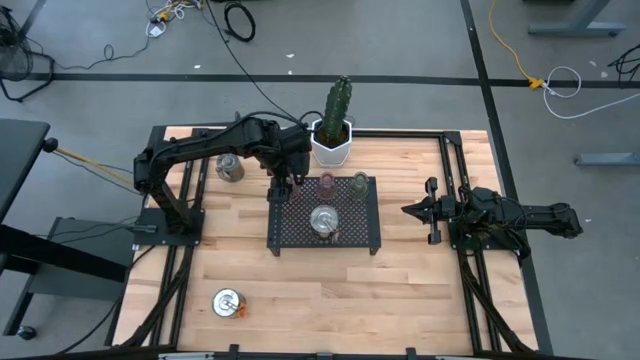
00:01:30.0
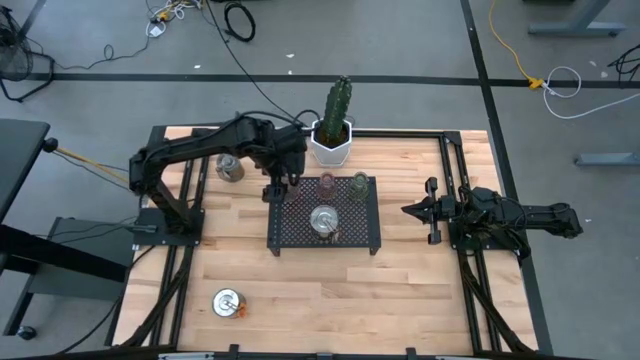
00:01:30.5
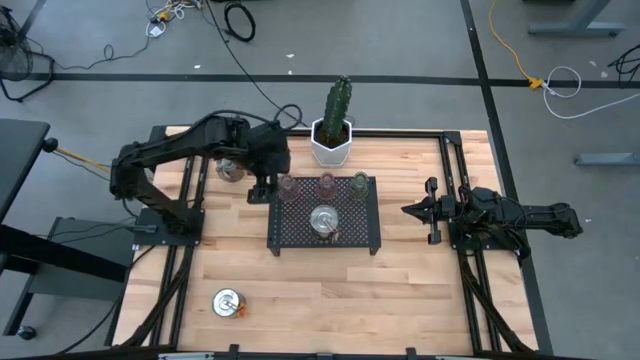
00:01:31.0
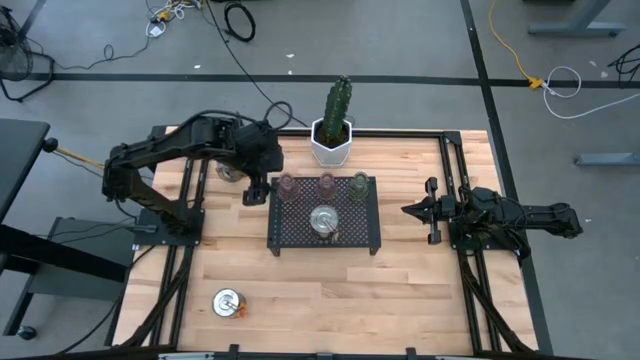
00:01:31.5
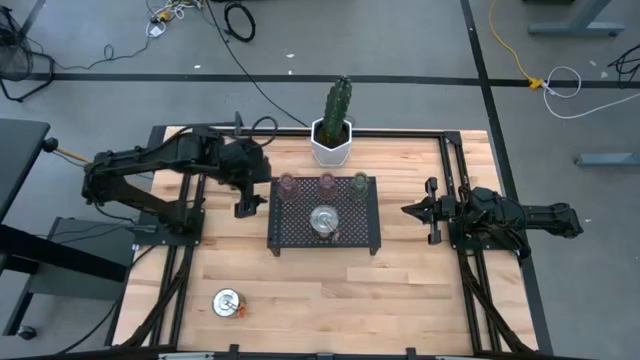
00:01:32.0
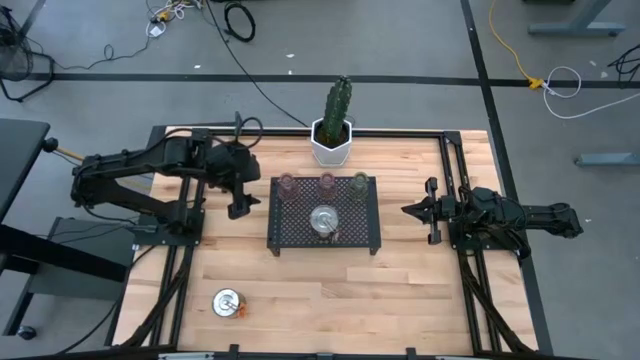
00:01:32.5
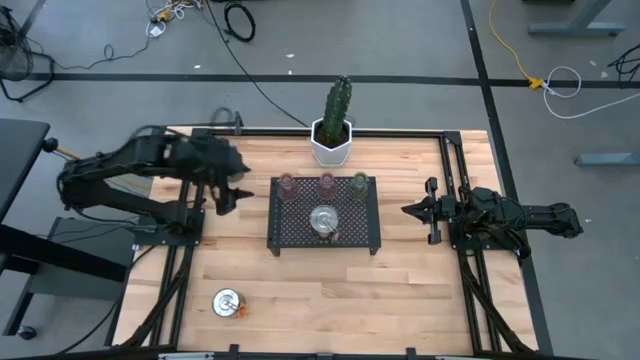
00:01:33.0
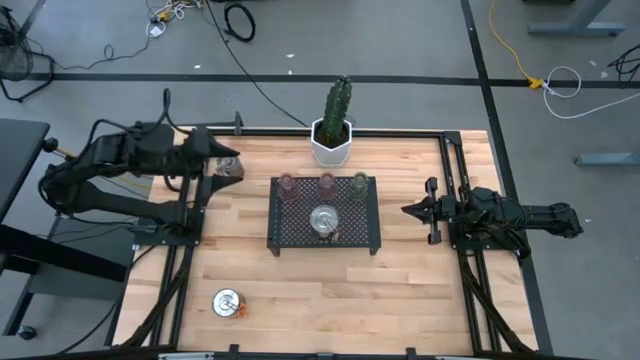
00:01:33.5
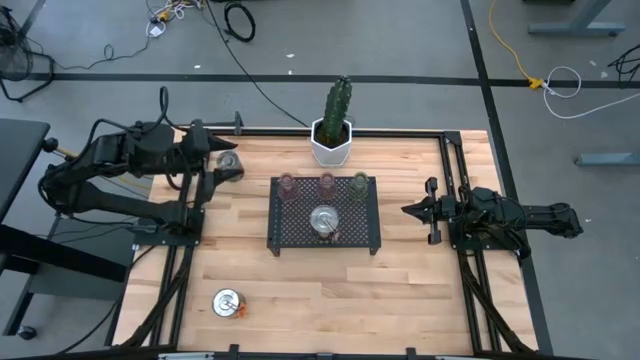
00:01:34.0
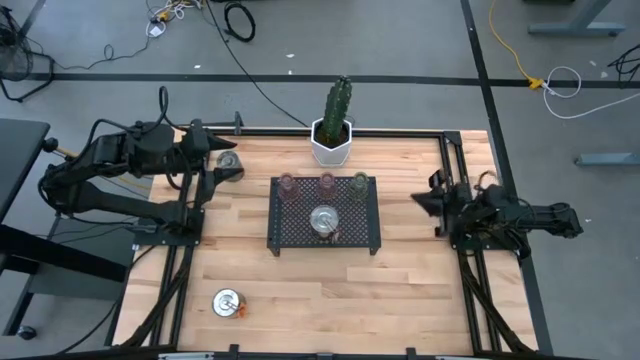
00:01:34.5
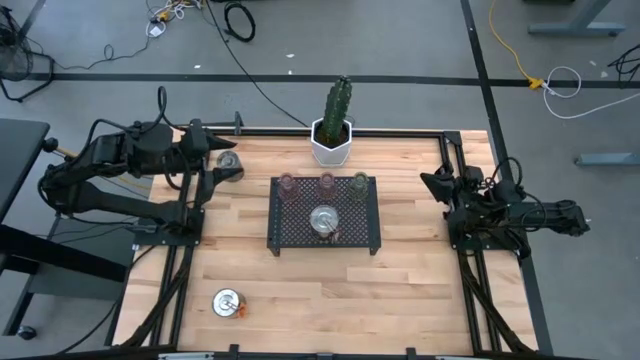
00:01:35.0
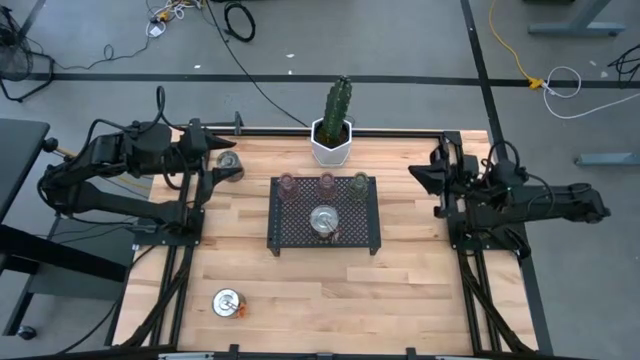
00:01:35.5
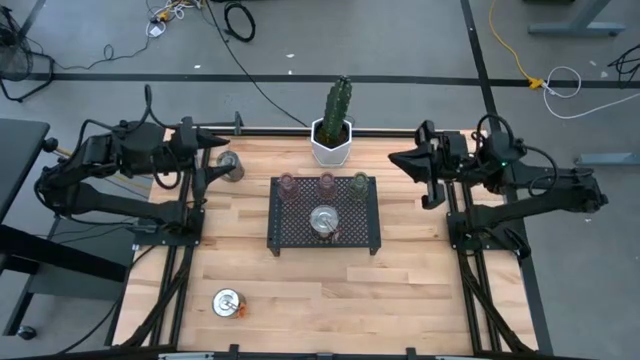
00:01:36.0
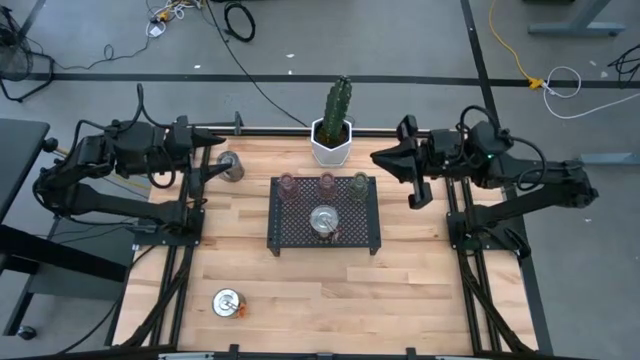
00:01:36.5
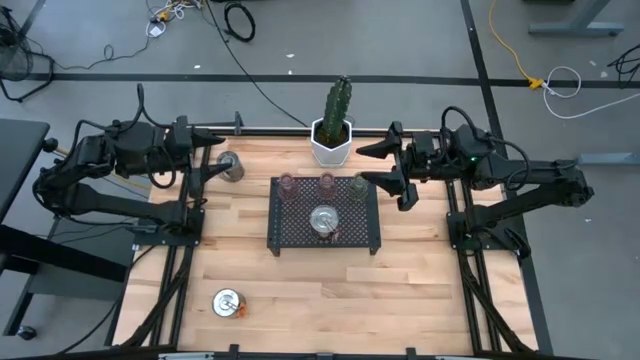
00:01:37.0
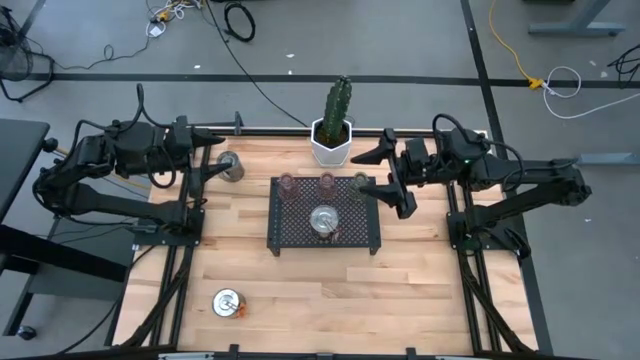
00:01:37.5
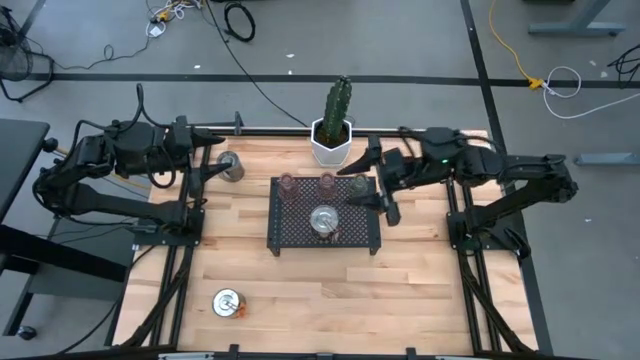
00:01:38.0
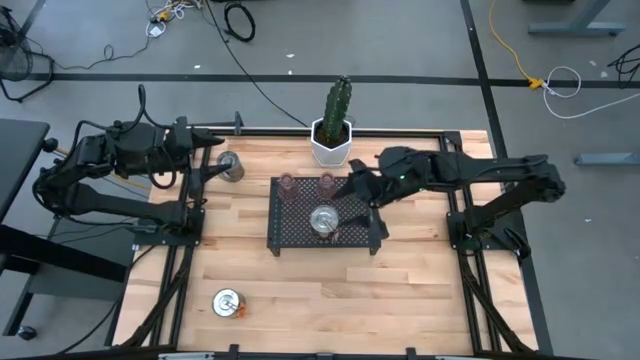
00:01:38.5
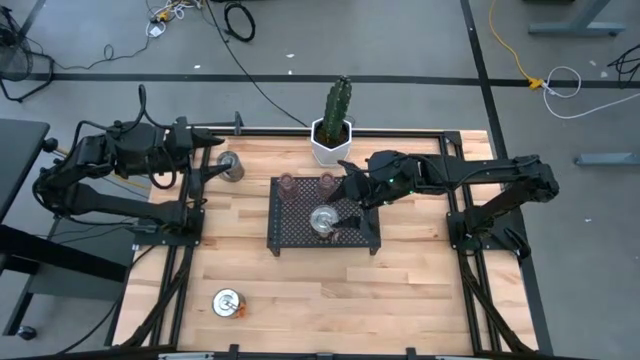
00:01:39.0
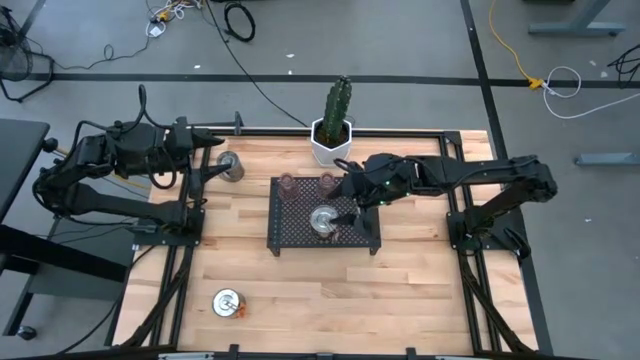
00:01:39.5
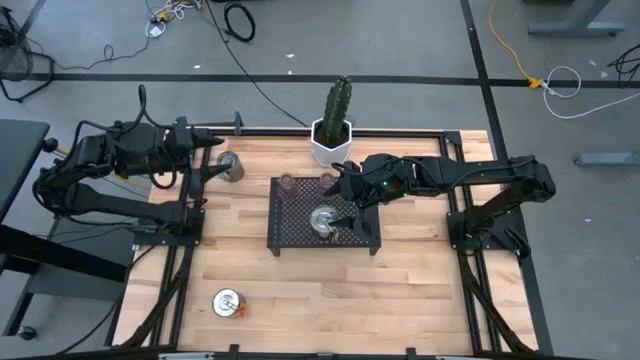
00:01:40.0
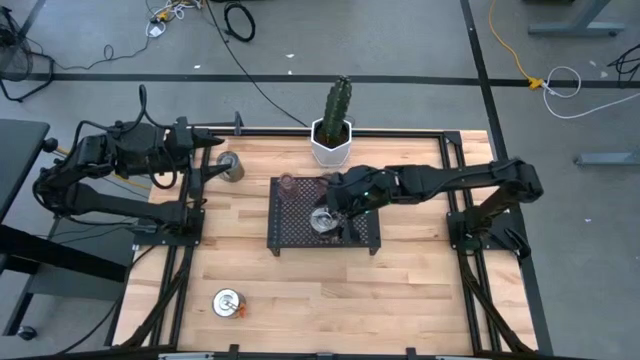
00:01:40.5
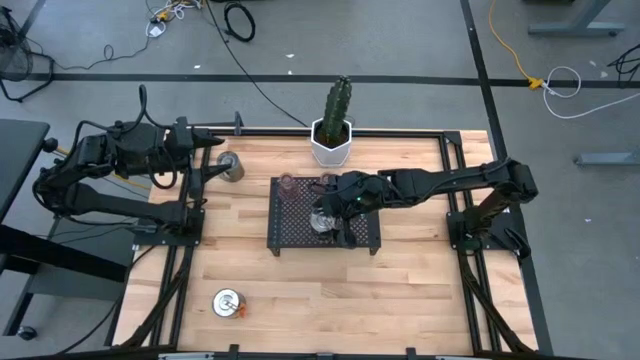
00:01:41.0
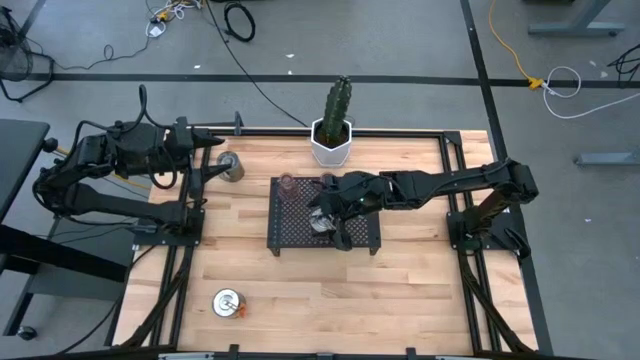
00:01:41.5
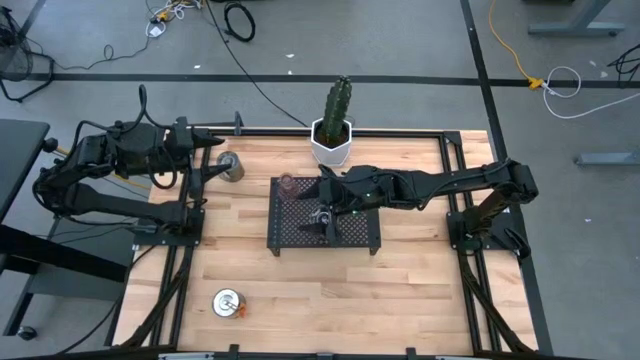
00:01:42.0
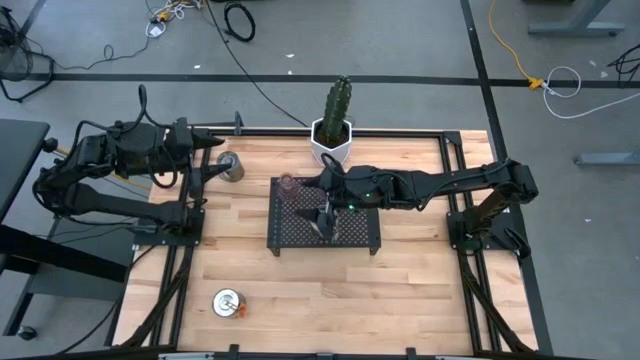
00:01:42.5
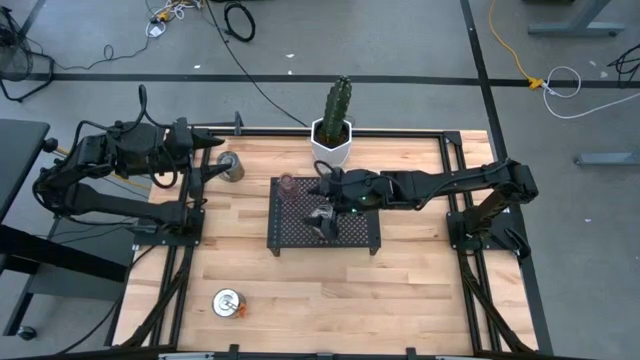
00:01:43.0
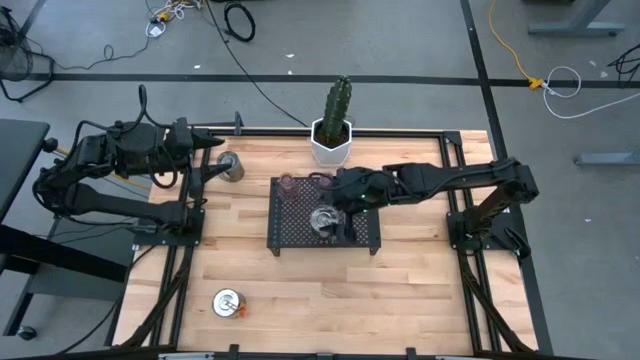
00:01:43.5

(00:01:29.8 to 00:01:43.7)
Task: Pick & Place candle stick holders
Adjust the silver scented candle on the shelf
